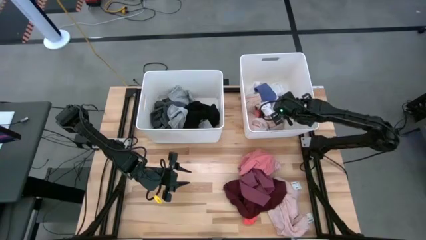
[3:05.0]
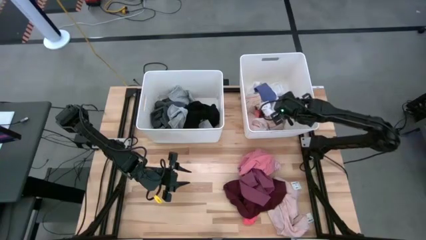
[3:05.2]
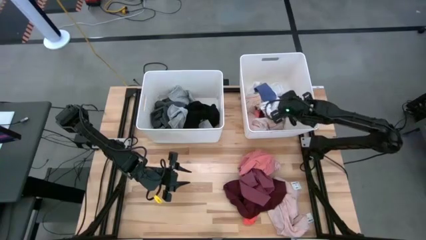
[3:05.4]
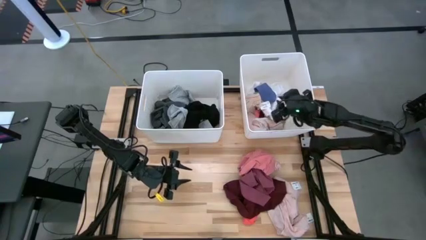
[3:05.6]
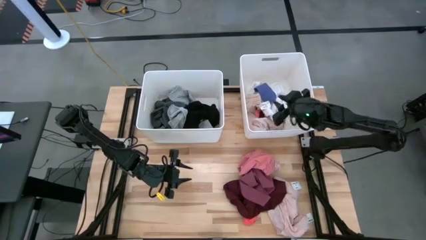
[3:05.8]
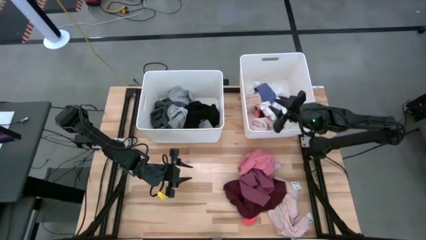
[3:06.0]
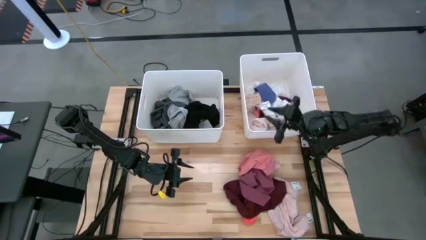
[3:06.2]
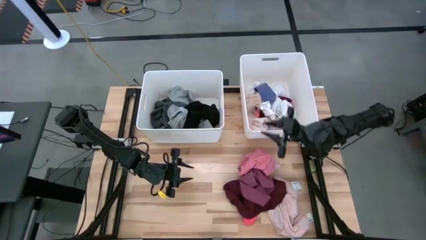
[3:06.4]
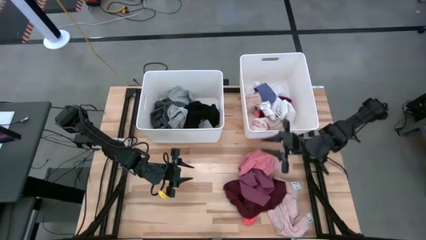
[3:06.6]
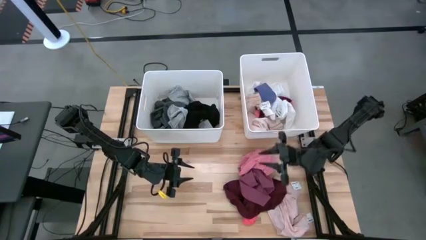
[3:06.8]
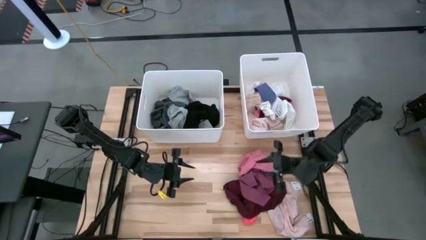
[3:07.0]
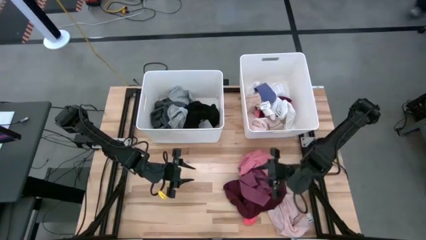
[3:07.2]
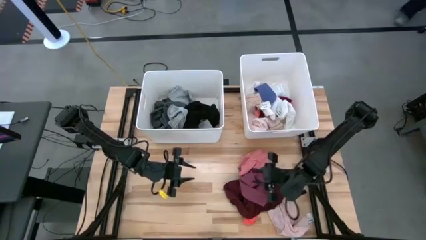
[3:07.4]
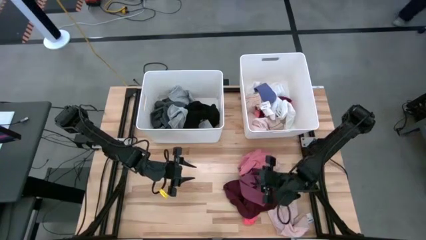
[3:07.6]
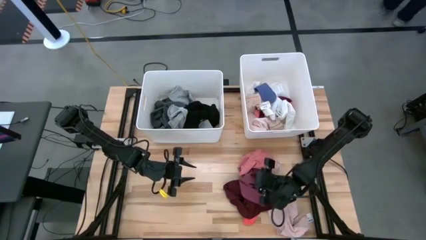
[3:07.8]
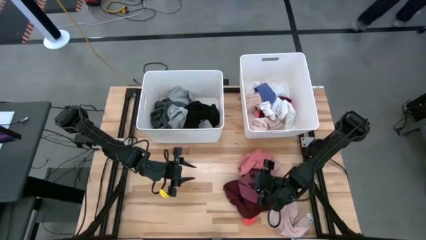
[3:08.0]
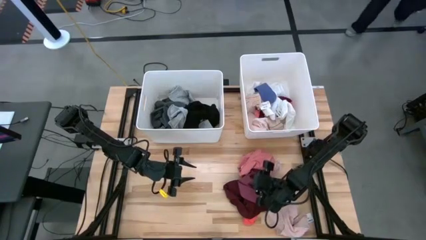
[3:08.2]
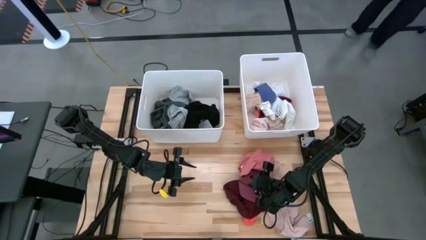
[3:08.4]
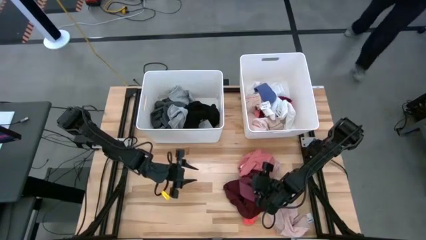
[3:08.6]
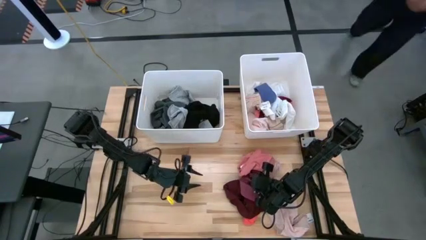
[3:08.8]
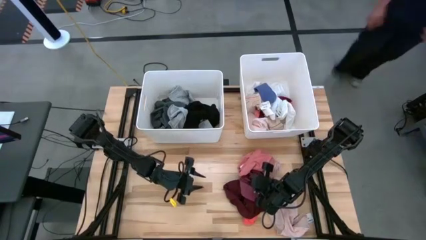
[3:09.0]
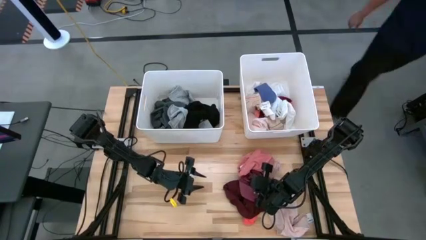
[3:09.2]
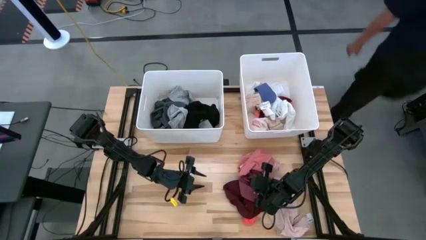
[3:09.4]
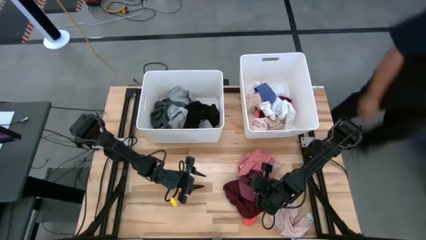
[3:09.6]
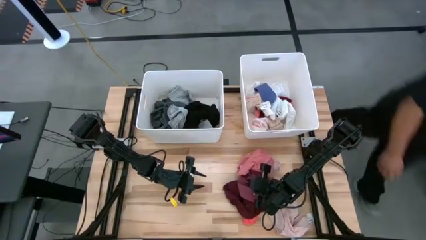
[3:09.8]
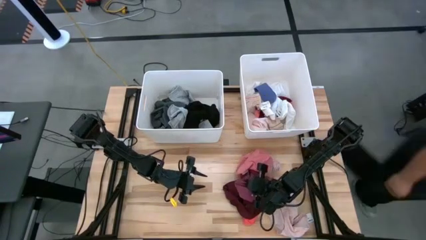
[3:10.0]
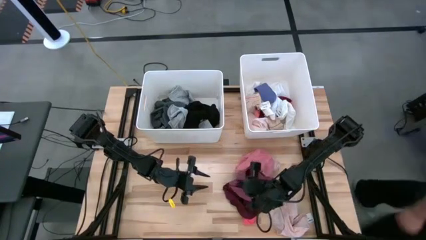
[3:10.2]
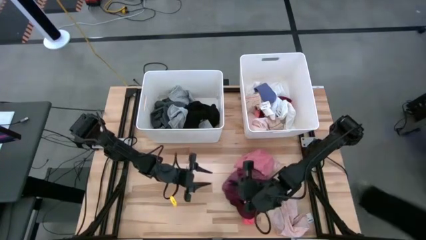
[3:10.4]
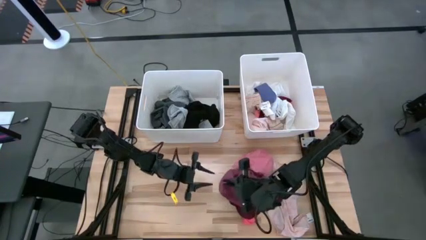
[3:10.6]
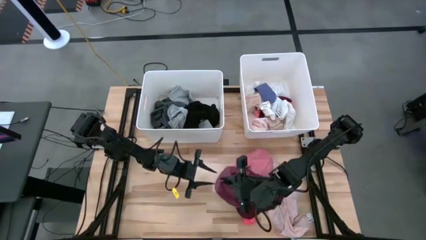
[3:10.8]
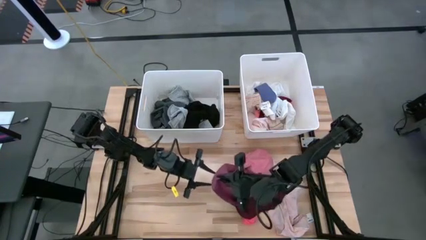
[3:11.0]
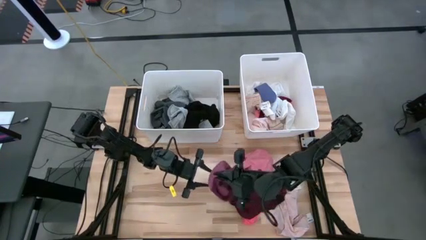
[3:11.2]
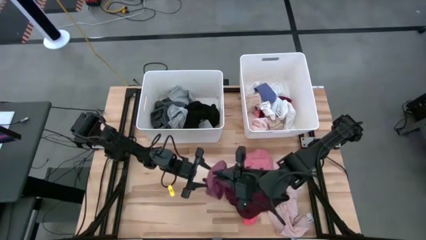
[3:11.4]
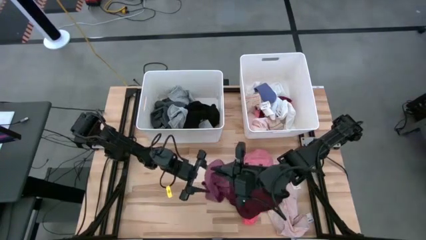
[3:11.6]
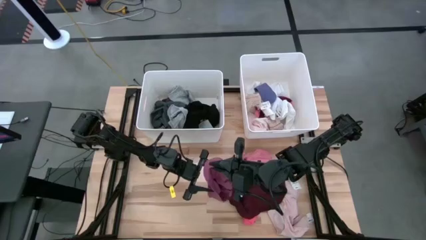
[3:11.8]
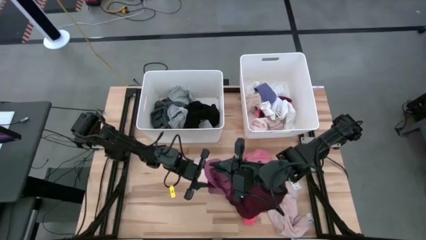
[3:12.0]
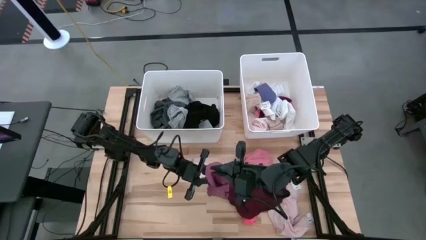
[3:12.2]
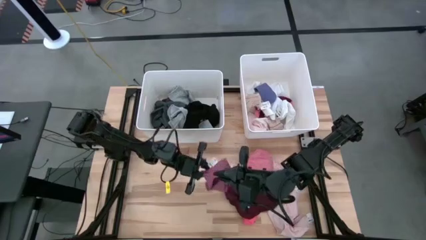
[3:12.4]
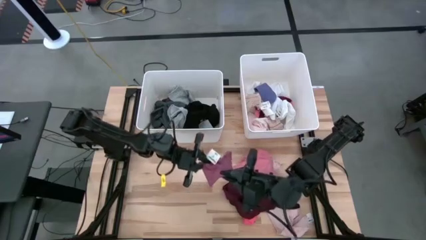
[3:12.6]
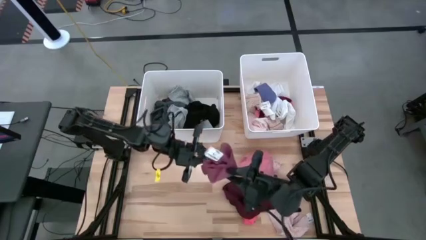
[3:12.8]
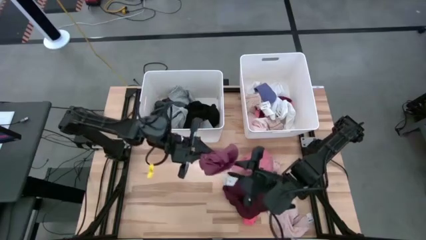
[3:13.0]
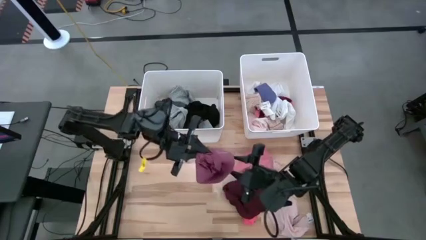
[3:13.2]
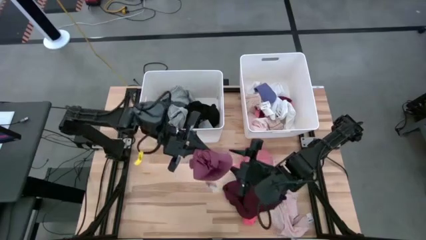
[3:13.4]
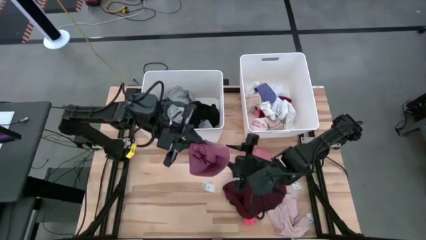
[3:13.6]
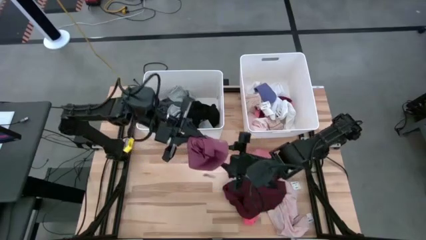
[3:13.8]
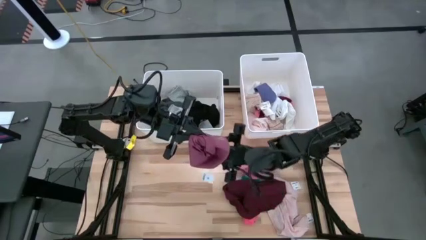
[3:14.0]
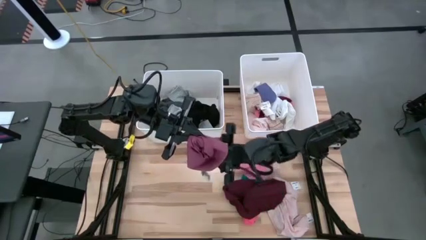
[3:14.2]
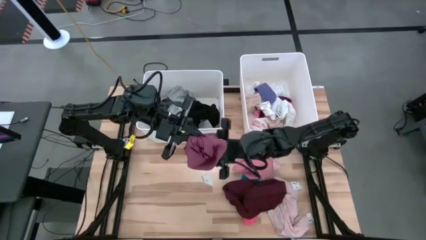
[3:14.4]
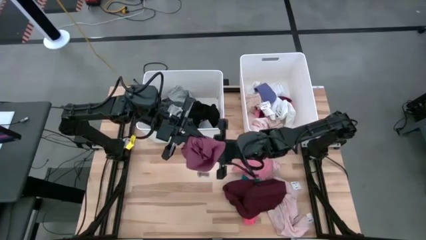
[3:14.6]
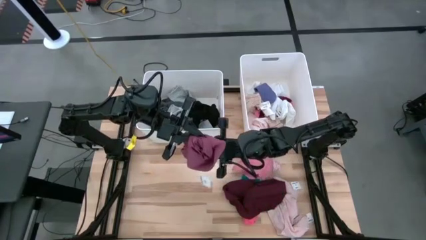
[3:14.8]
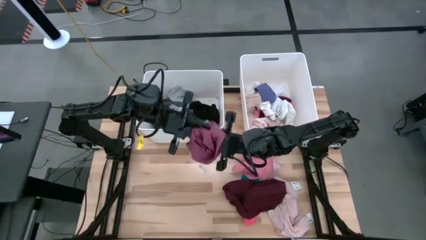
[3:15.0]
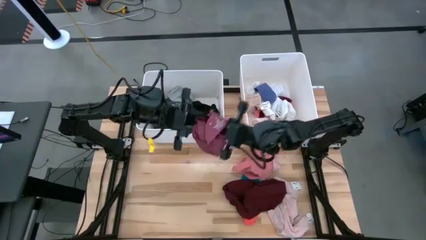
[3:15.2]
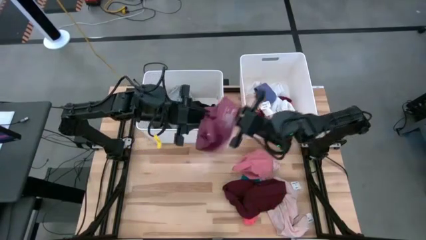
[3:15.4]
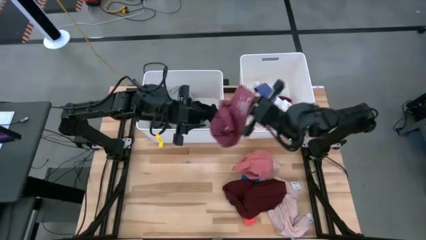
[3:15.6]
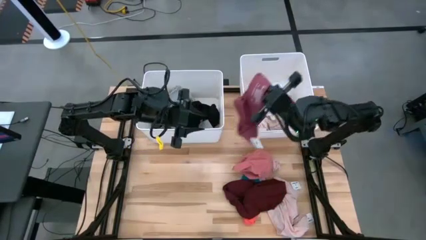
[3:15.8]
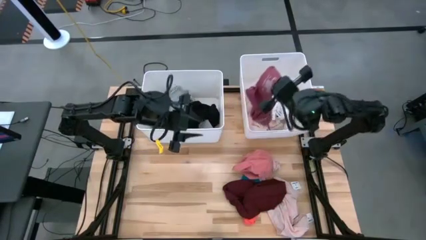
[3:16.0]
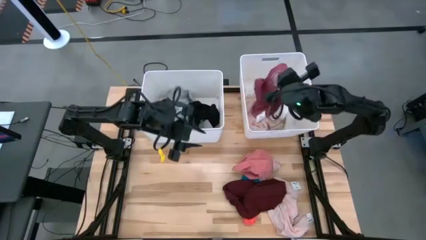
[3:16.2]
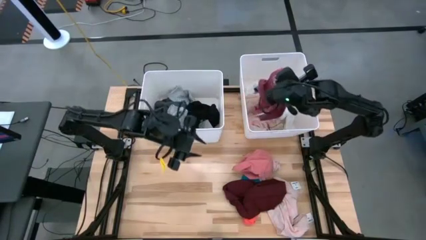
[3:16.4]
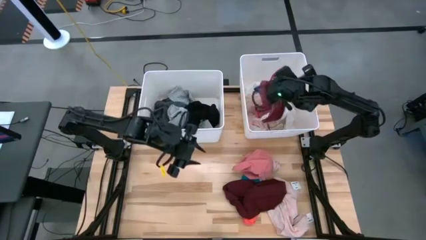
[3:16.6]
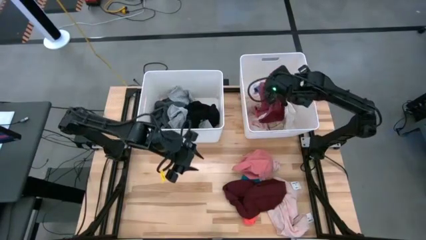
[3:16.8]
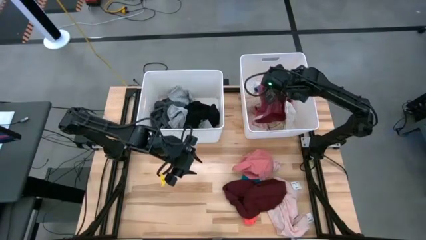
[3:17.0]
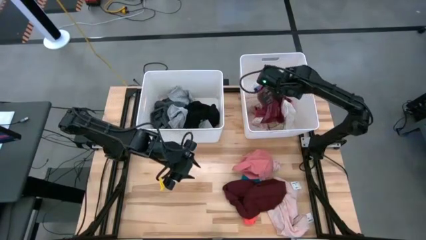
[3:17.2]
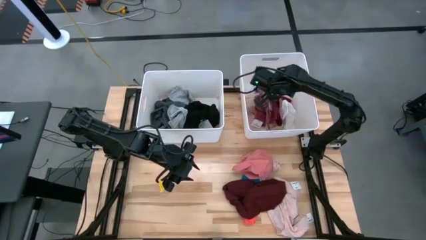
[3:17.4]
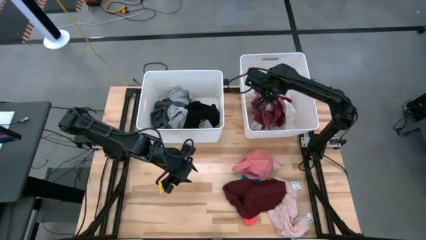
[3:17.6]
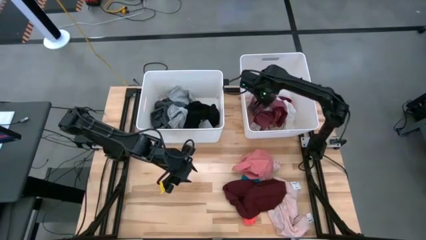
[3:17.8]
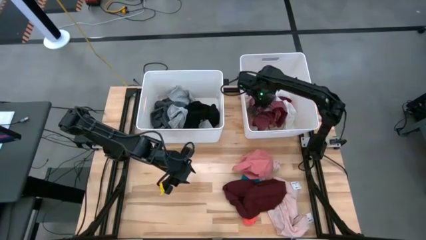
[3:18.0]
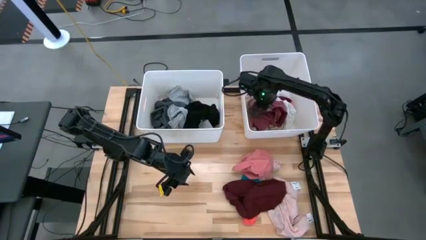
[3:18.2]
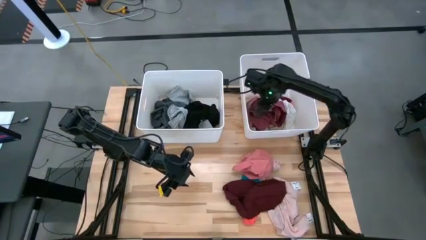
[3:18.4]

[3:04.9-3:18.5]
Task: Sort clothes
Put the red underwear into the right white laundry organizer
